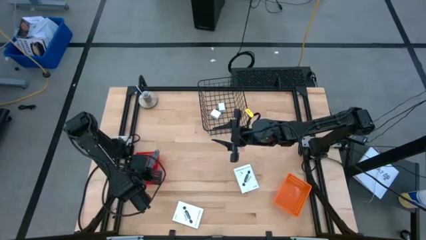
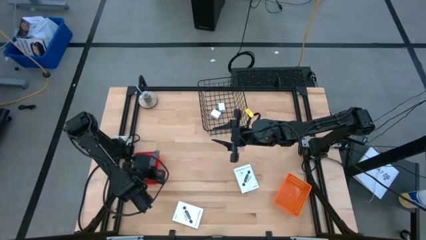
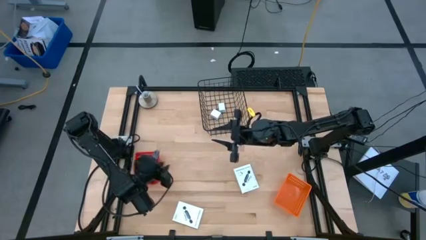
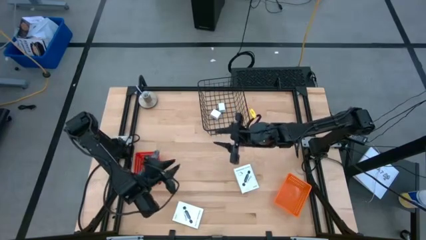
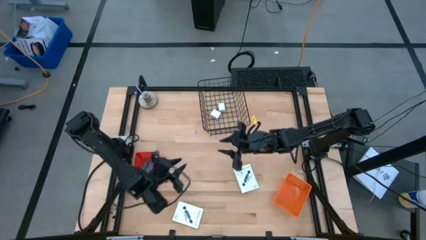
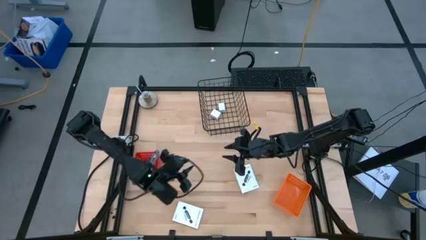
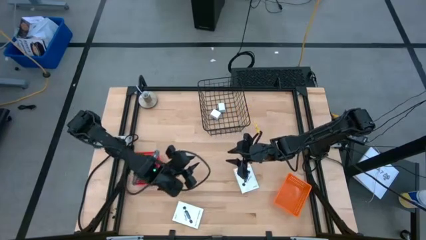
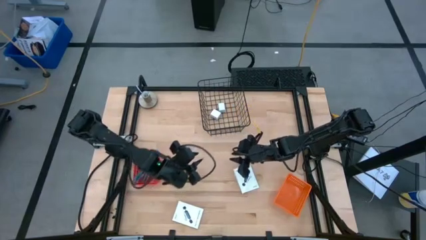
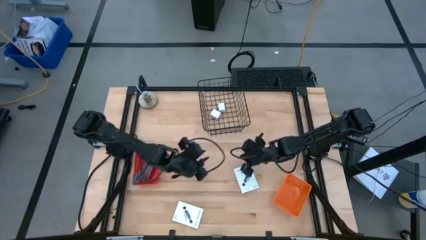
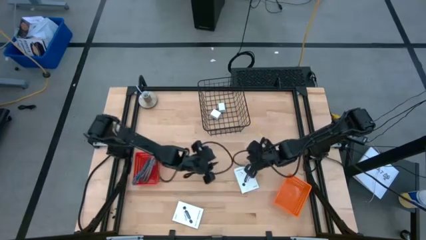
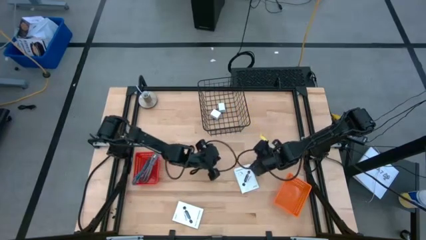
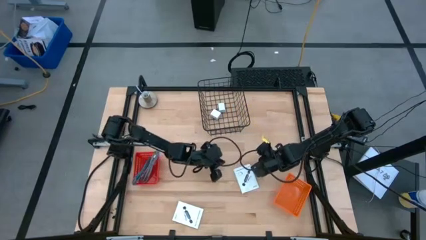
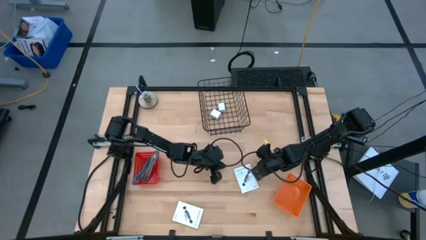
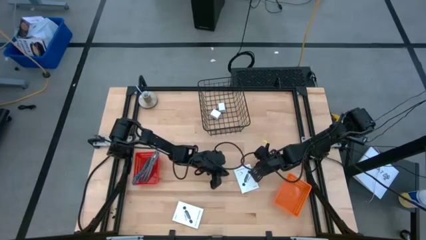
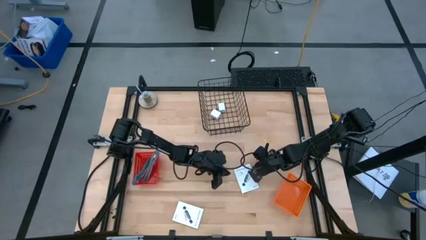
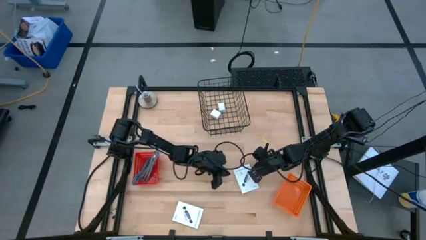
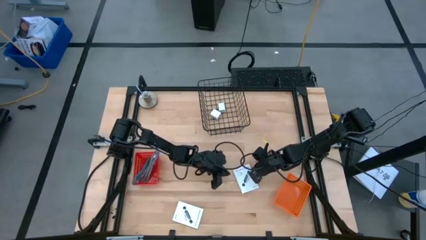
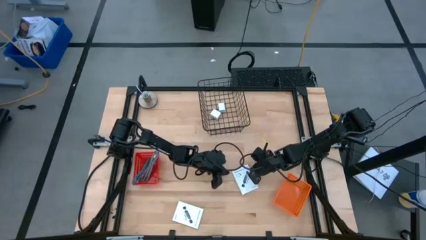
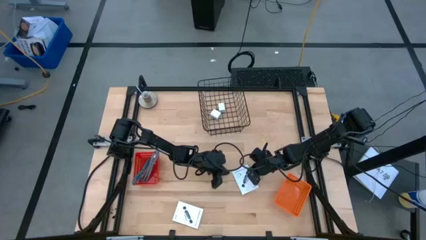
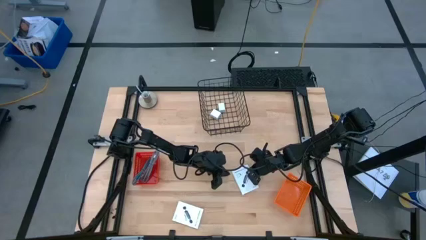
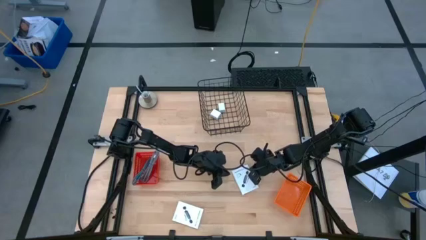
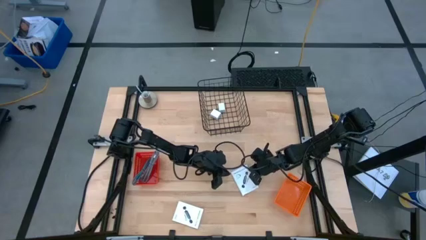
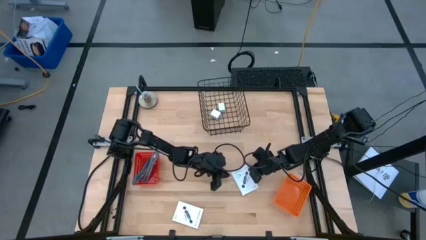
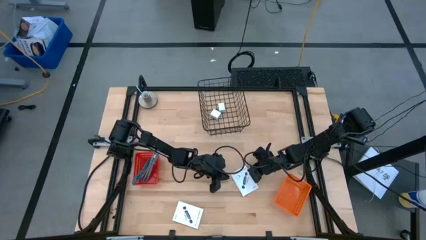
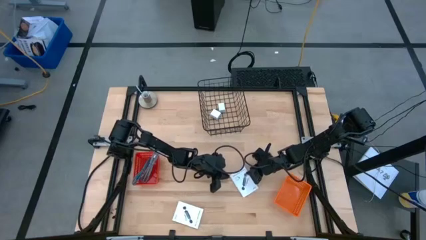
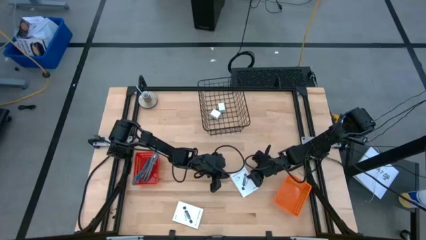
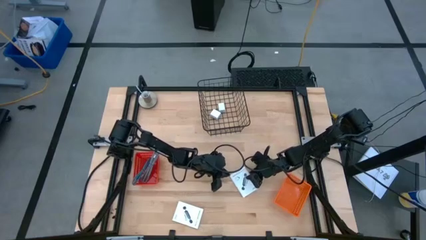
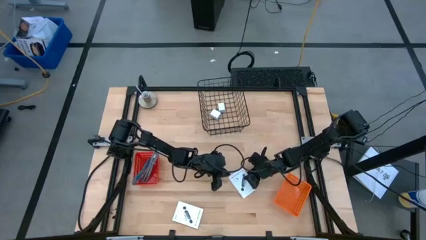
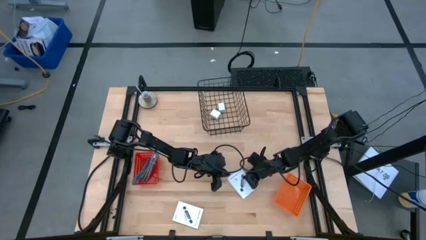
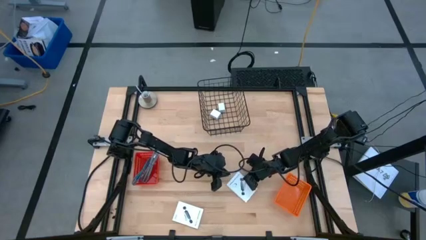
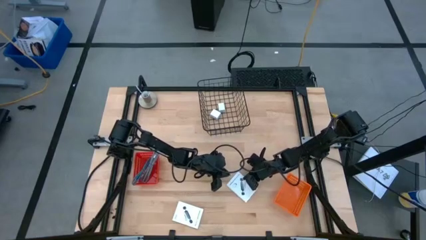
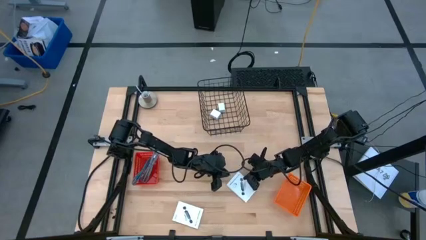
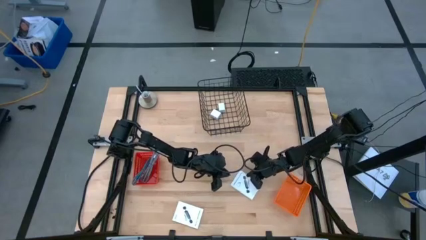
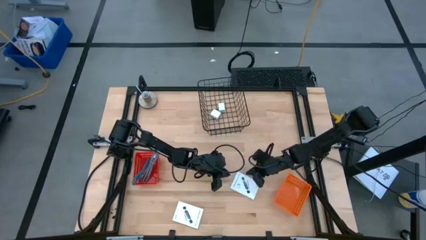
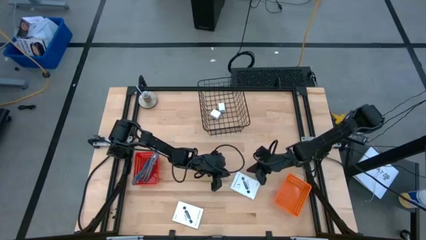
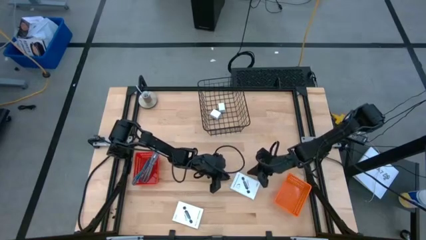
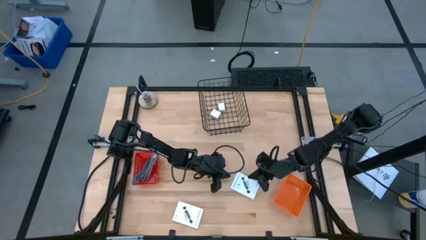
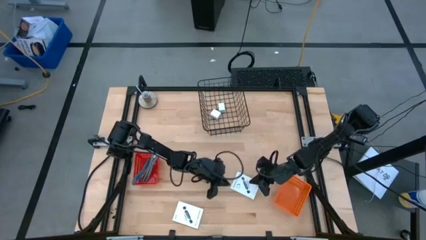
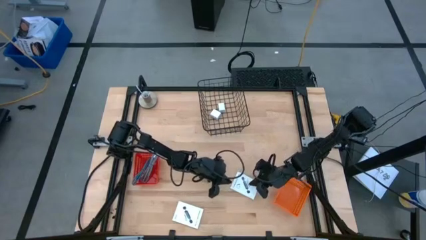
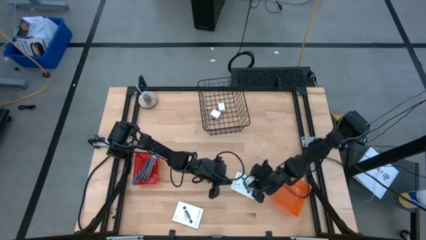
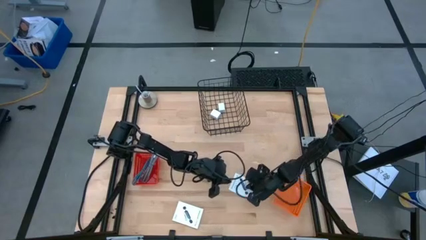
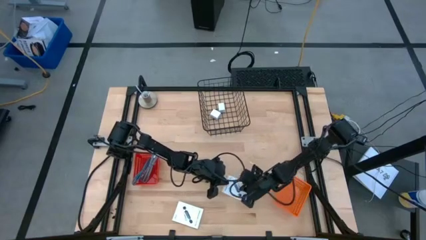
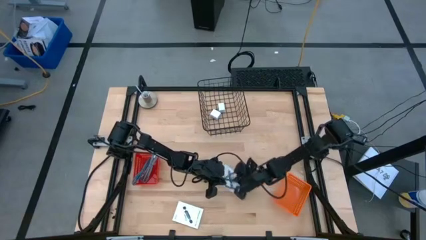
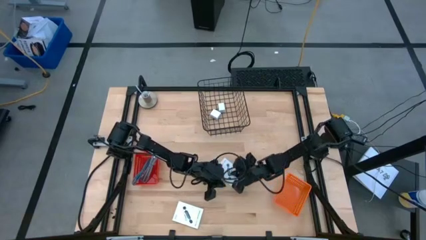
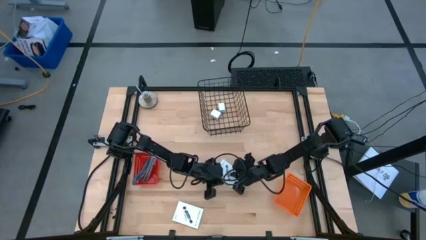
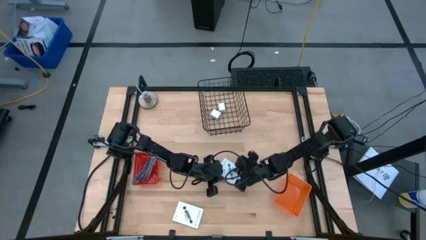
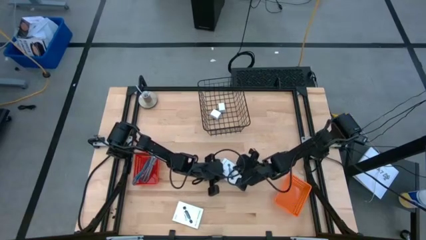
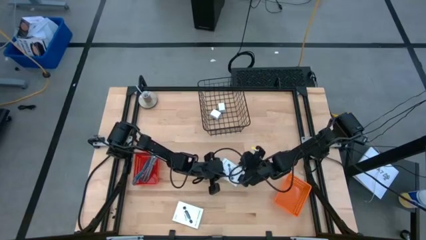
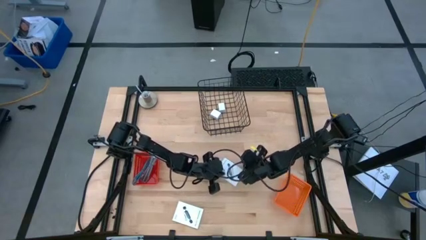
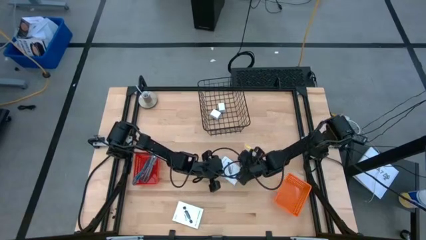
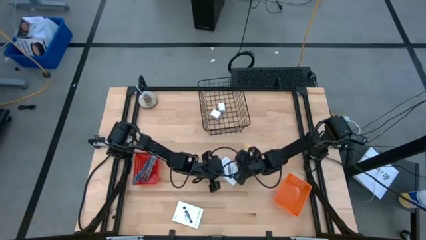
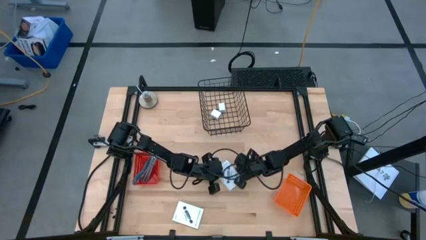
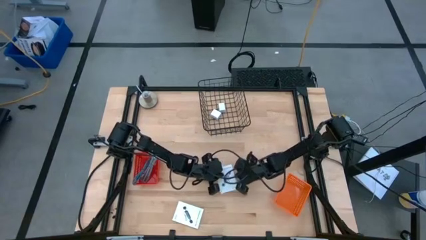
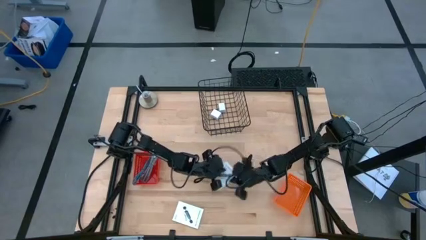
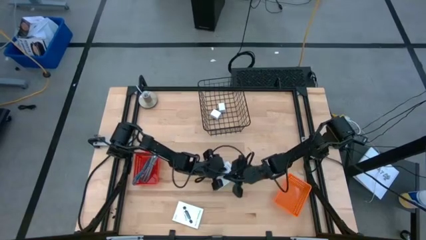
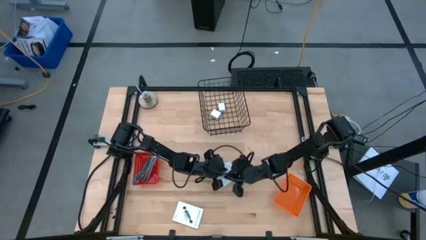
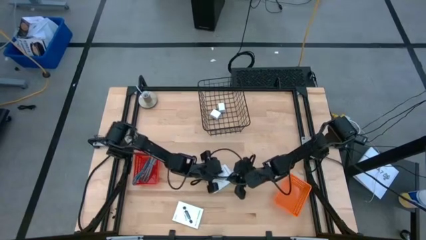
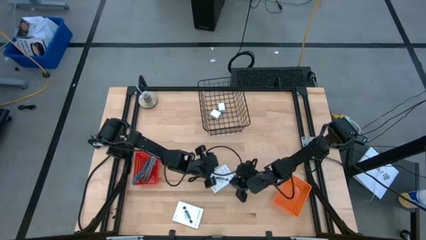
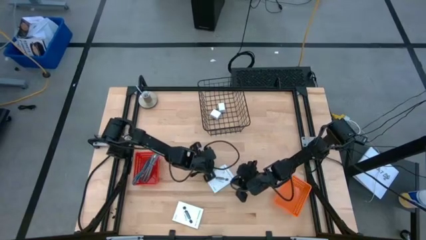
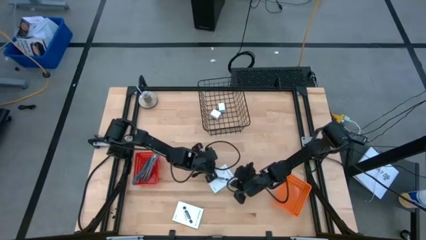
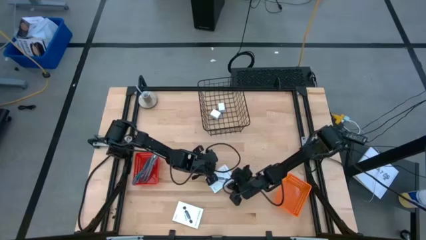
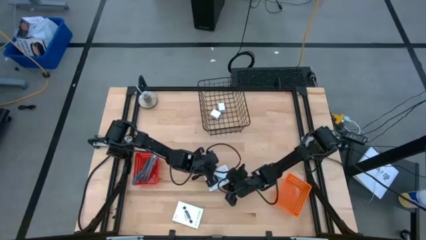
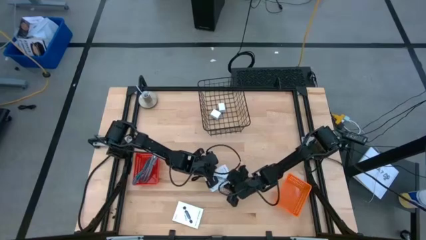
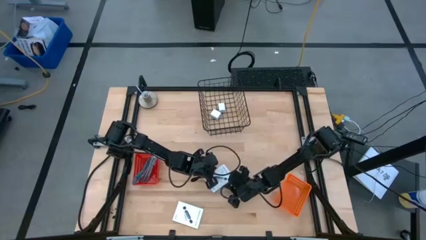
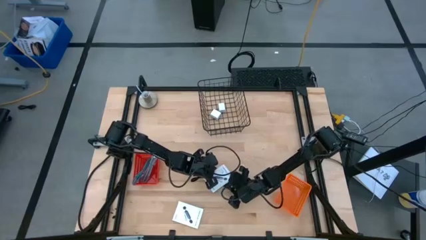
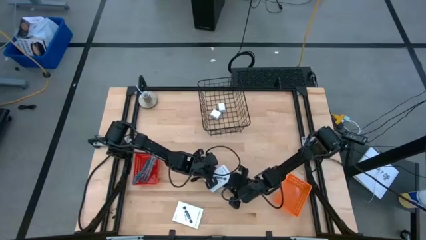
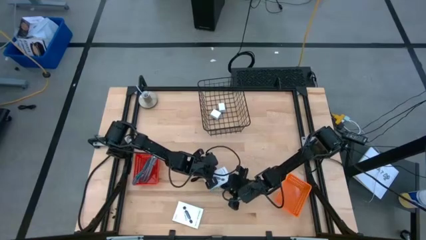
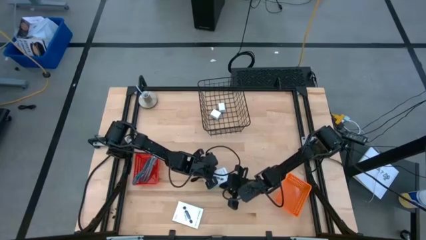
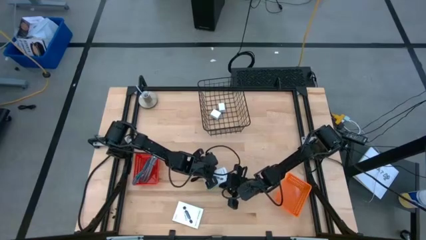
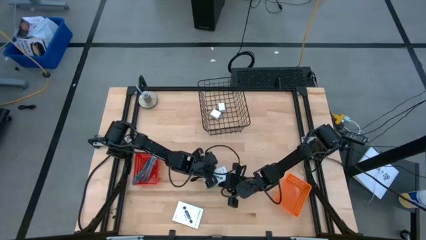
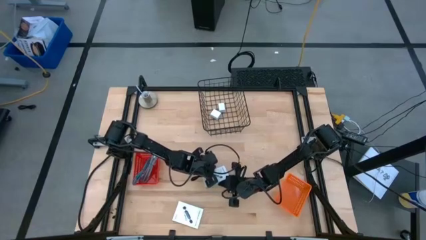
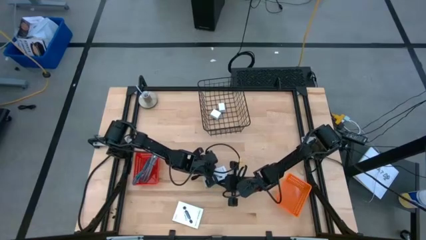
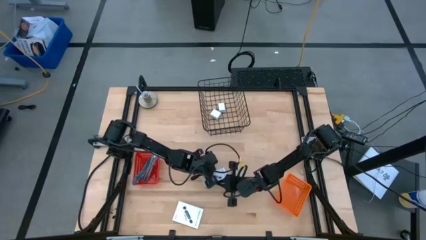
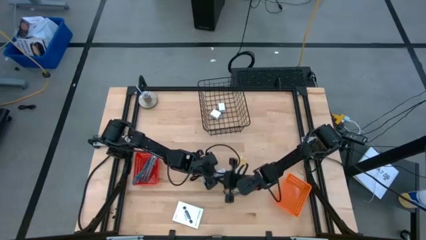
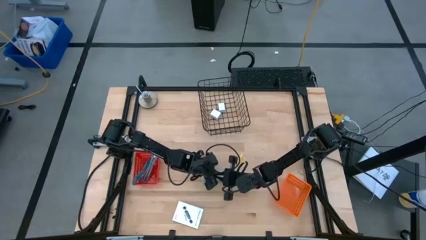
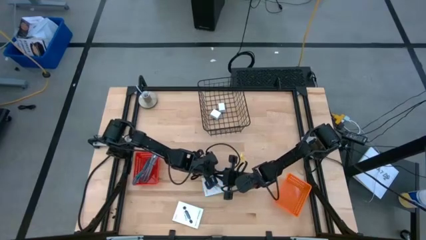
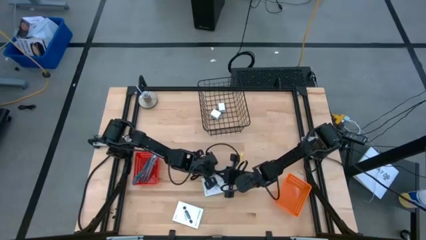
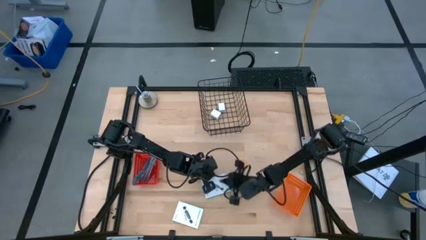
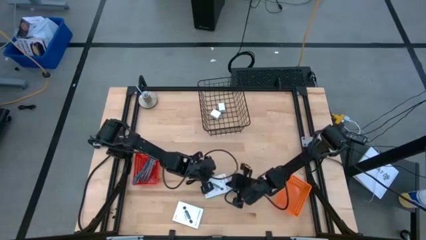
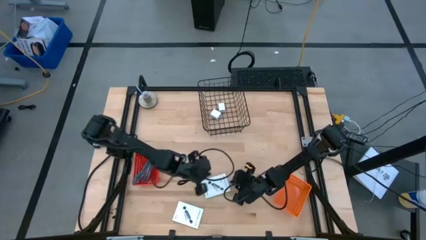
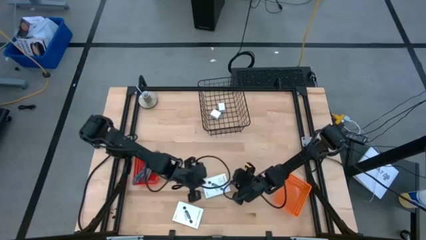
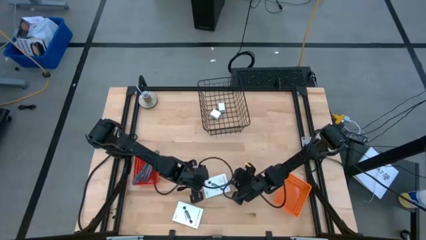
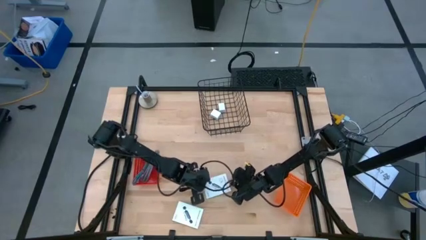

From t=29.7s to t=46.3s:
Task: Pick and place items into bin
Put the right card reader box into the orange basket
